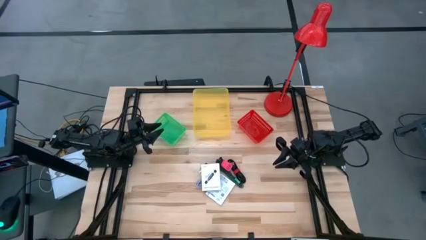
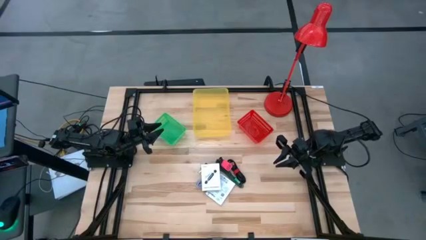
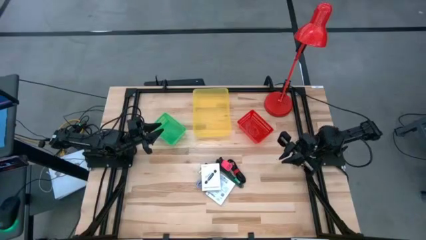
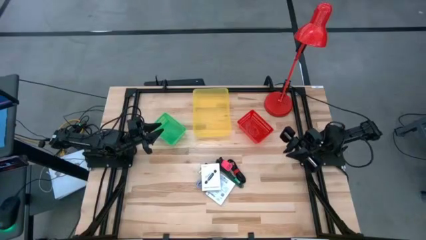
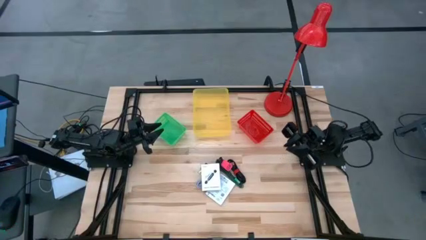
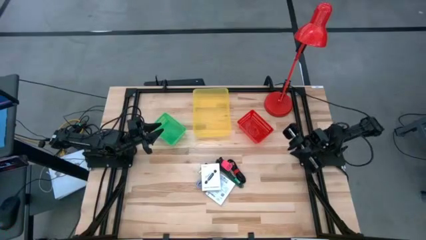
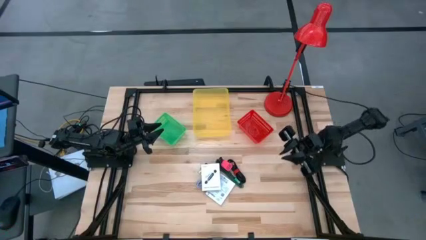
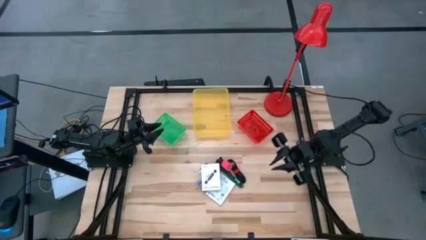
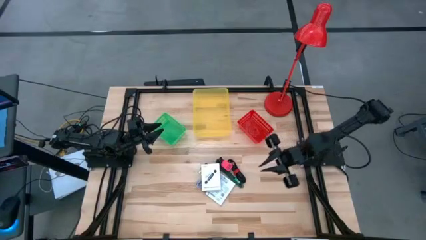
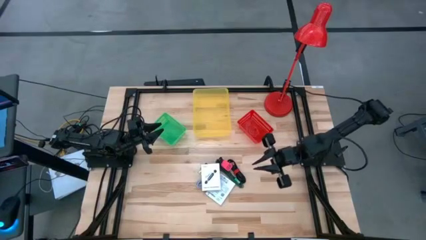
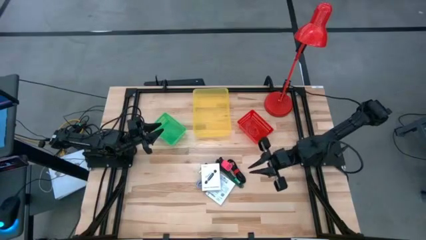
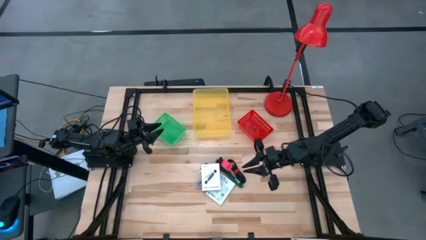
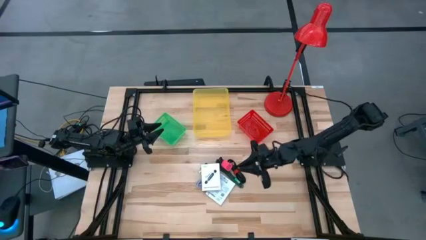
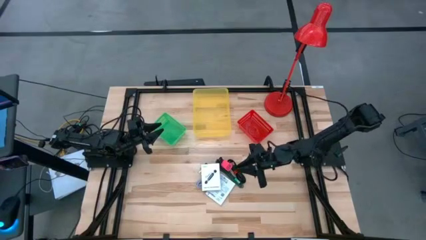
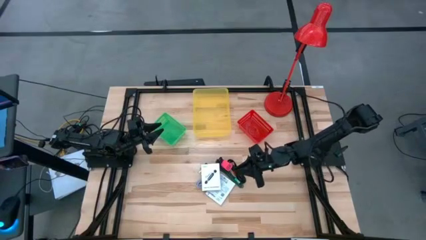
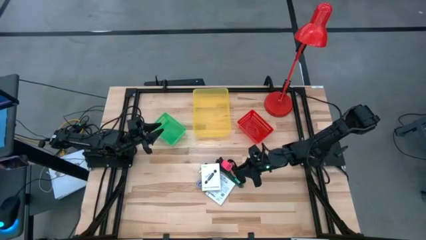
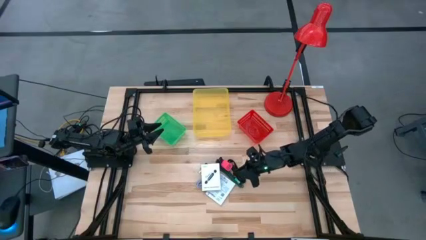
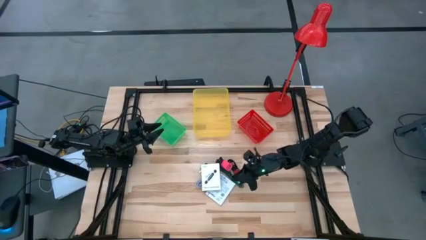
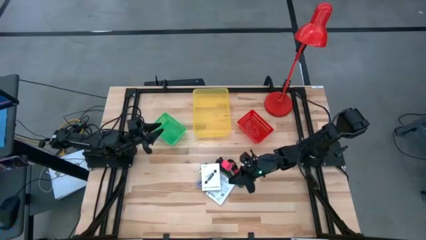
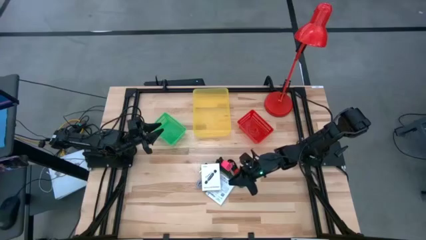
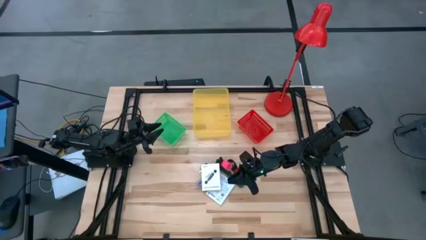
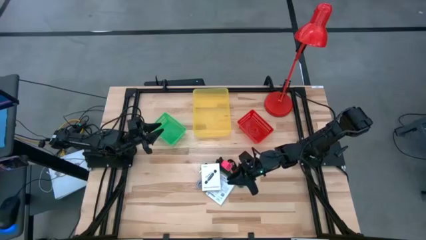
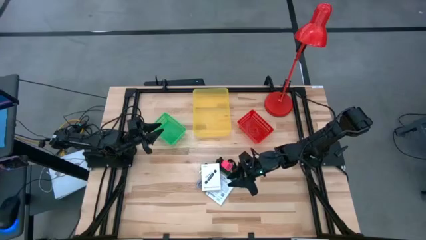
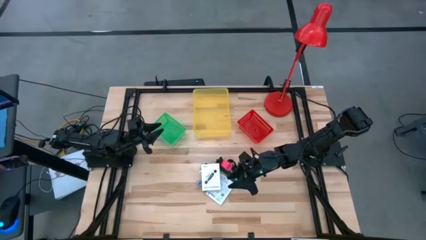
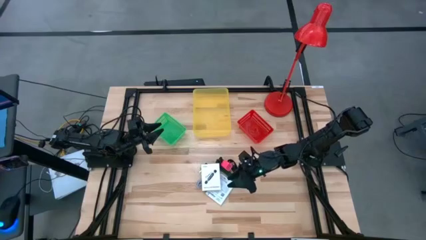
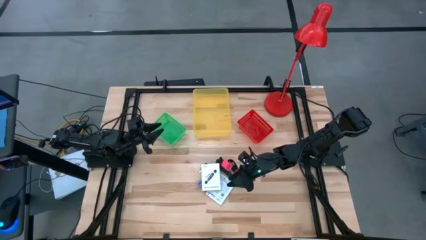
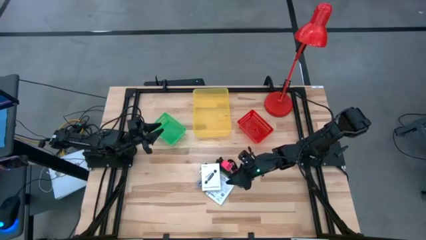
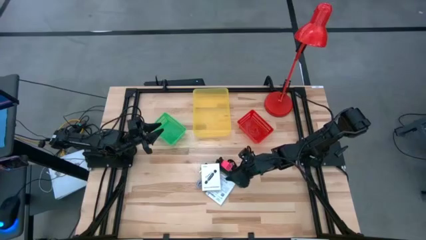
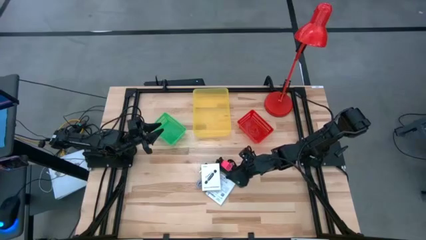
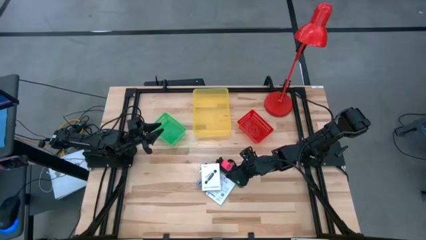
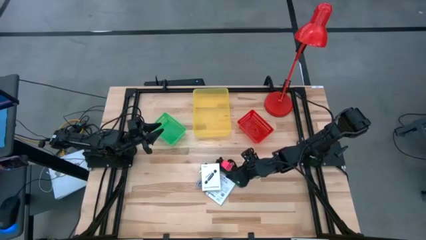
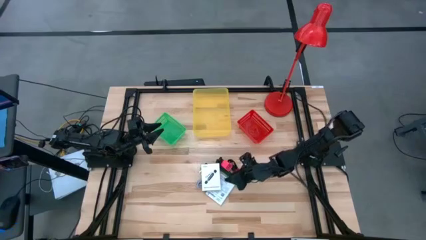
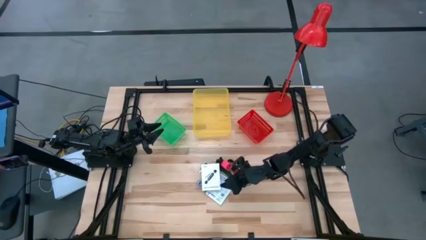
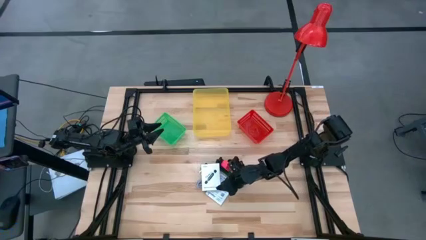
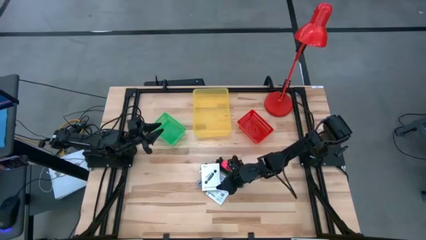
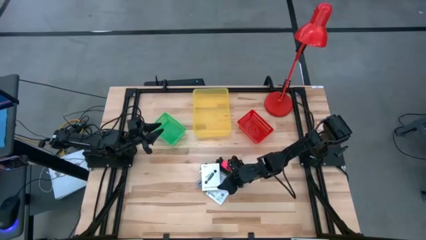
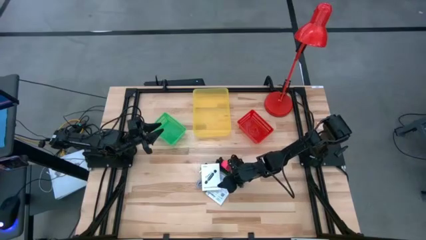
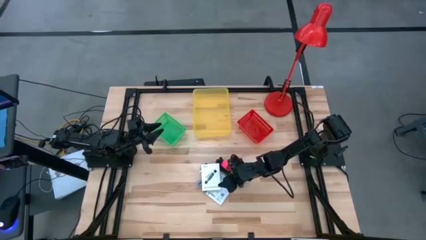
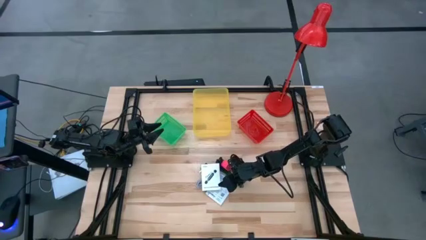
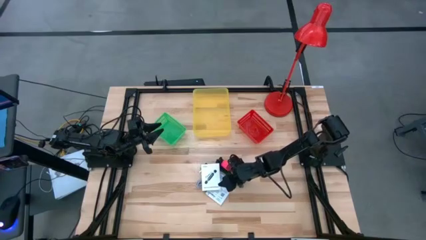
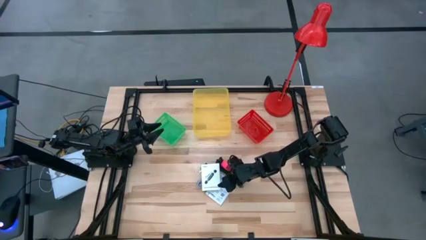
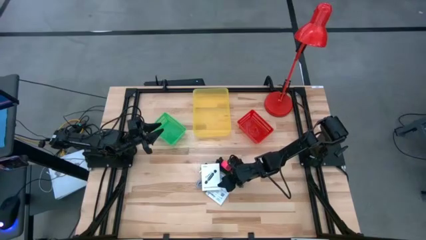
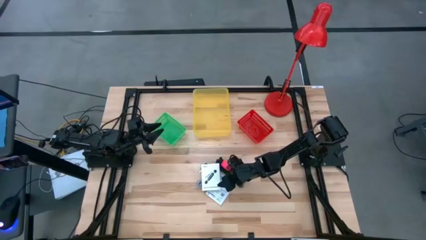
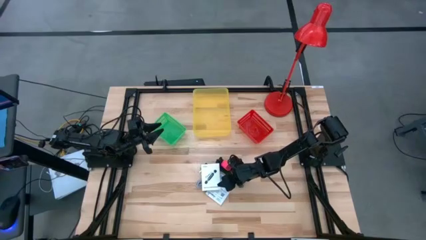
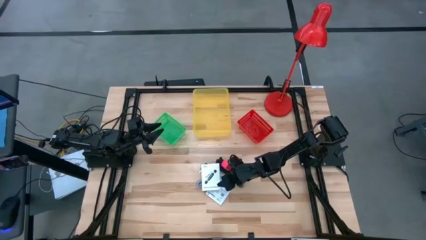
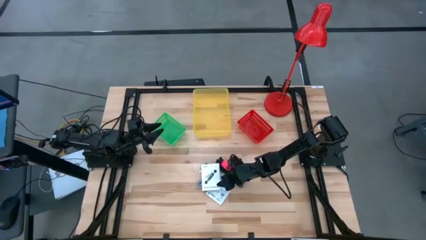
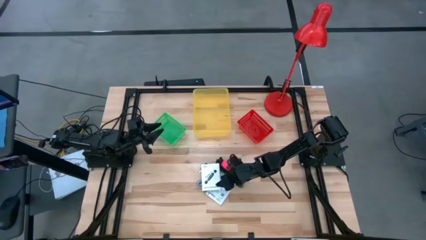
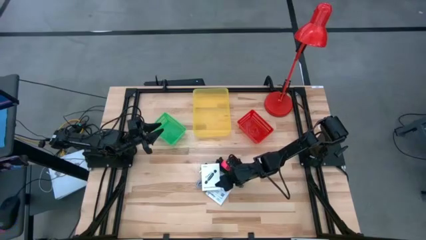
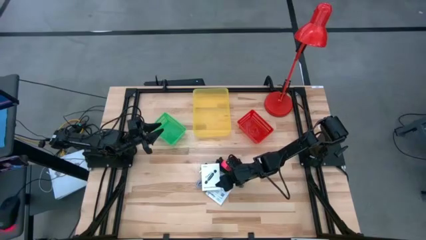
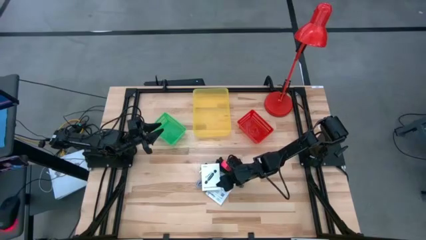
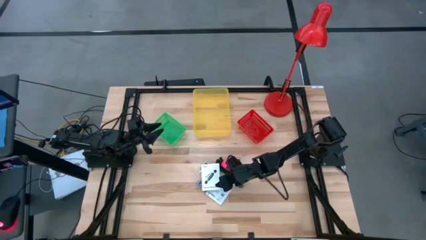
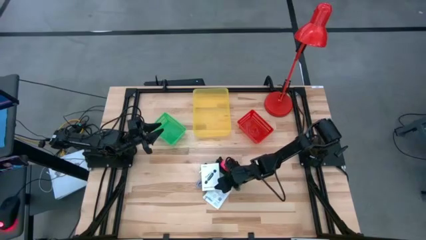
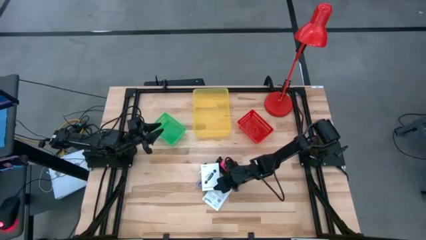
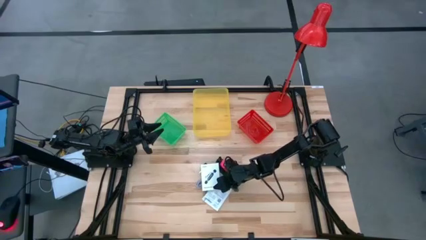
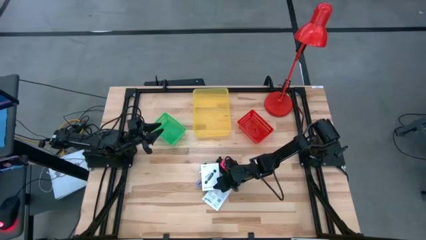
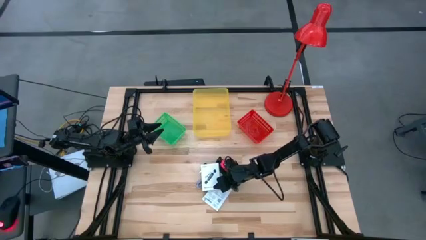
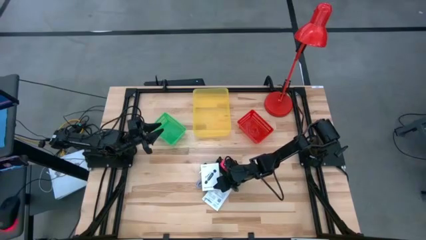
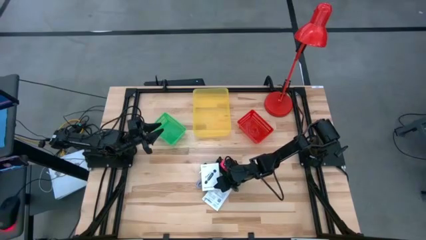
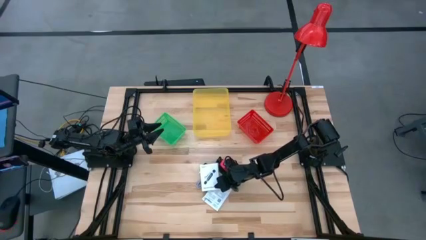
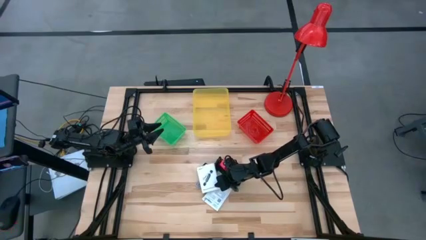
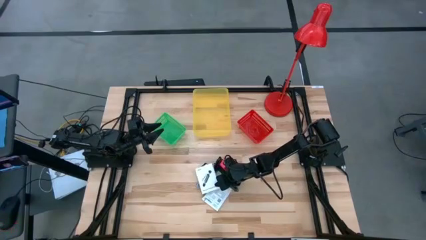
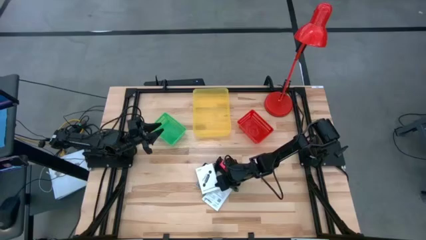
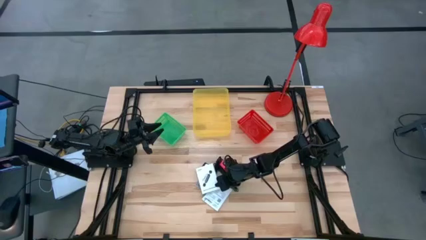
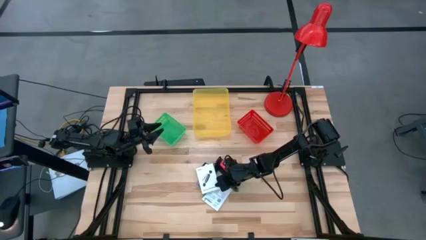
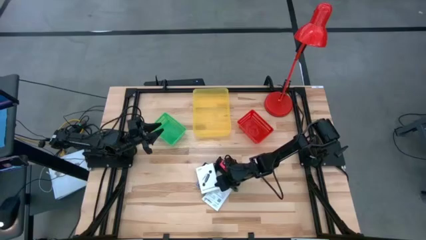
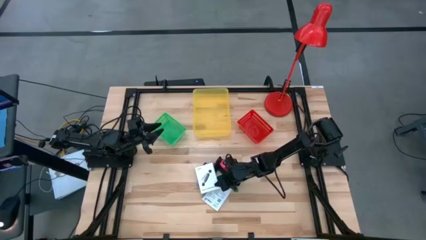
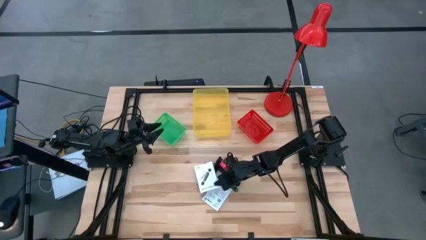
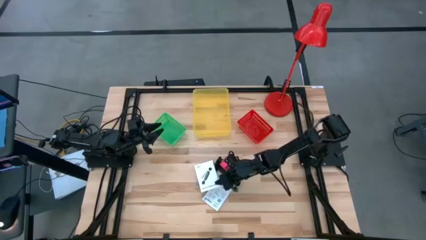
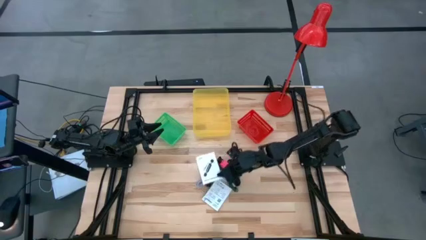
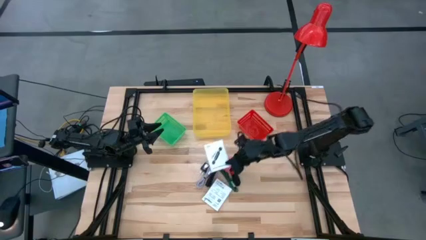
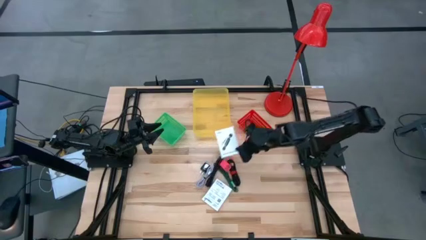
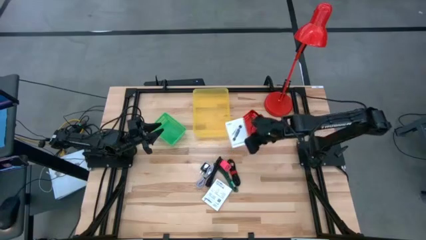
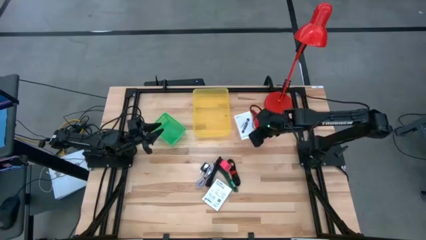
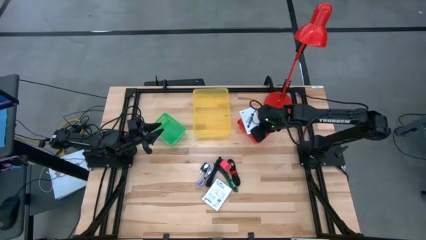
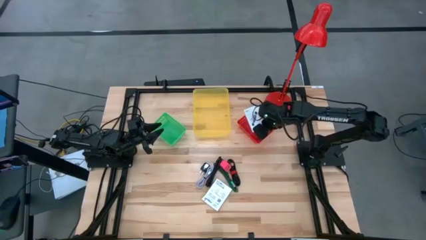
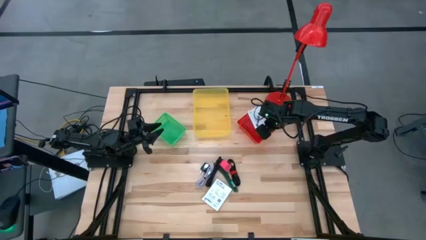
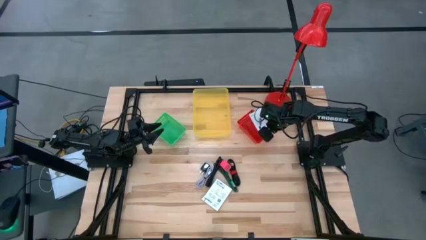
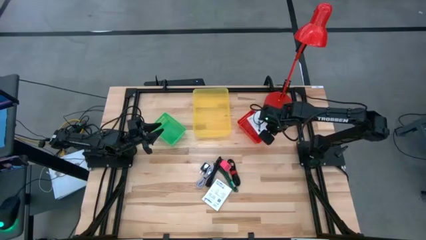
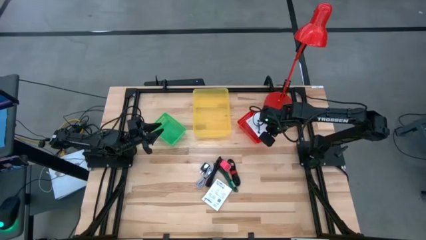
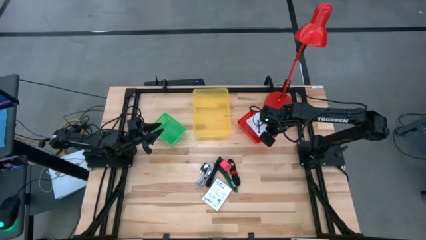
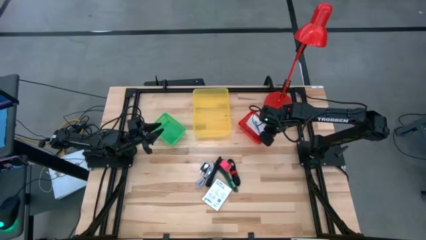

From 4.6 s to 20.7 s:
Task: Pick and place items into bin
Put the top white card reader box into the red bin
